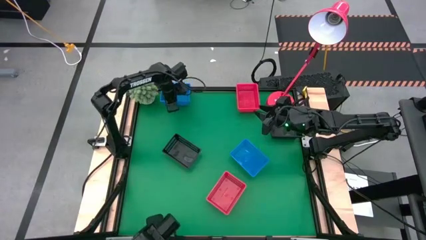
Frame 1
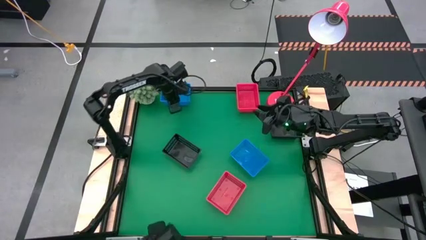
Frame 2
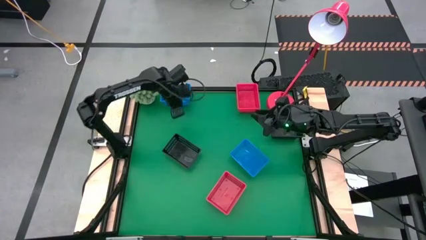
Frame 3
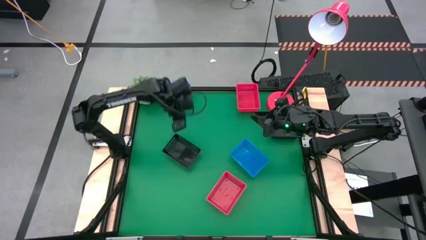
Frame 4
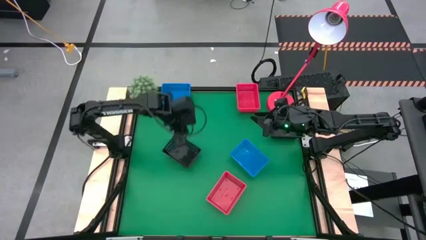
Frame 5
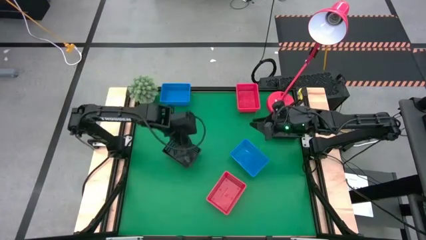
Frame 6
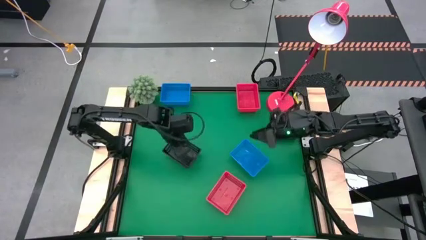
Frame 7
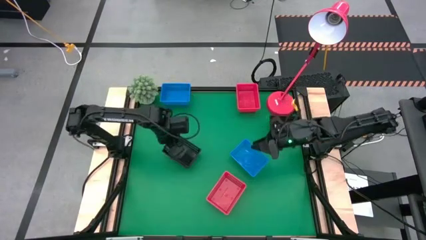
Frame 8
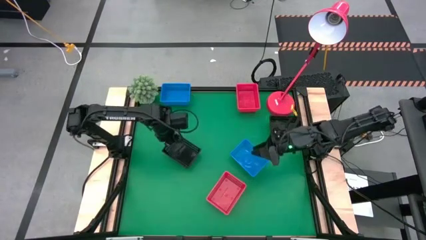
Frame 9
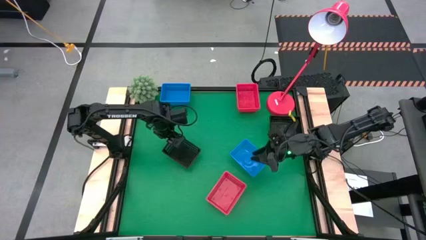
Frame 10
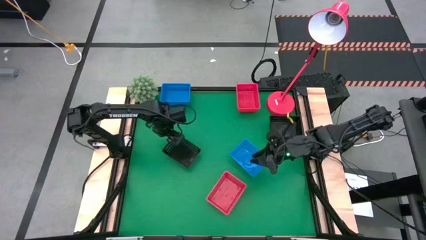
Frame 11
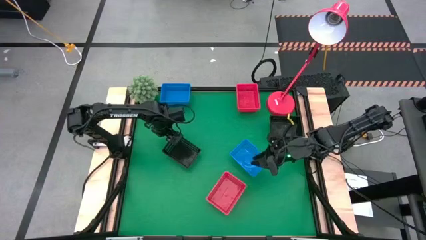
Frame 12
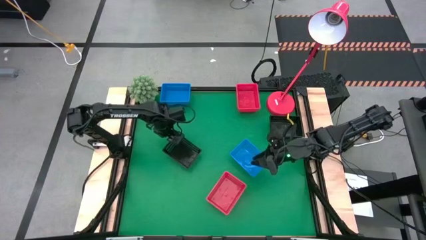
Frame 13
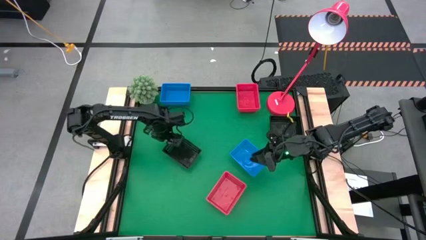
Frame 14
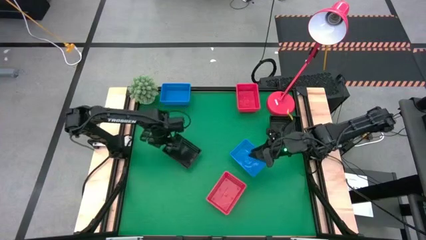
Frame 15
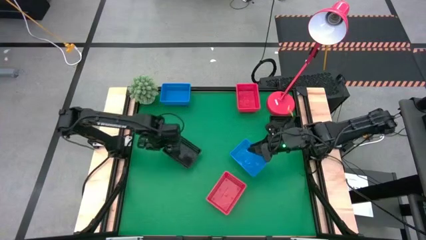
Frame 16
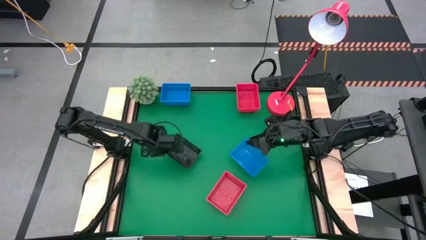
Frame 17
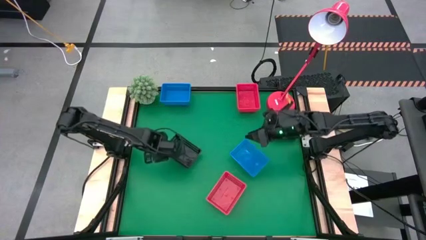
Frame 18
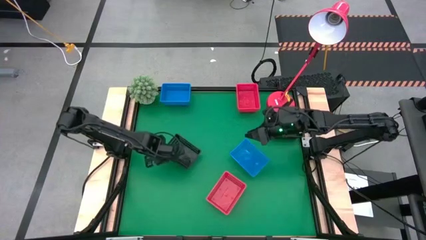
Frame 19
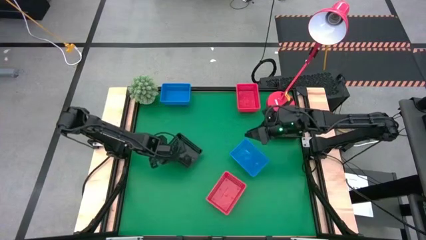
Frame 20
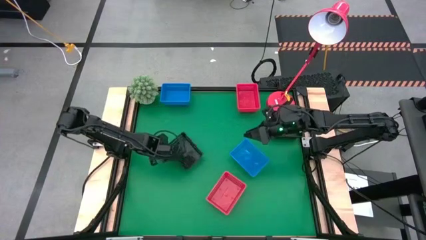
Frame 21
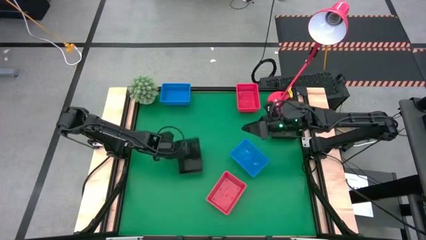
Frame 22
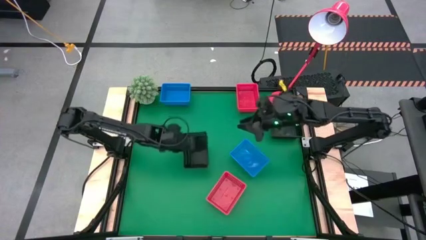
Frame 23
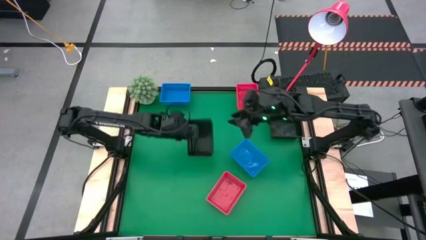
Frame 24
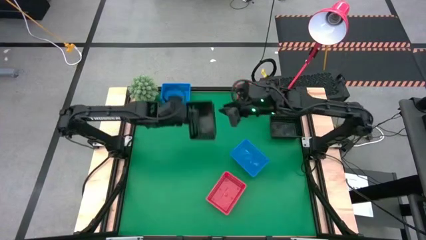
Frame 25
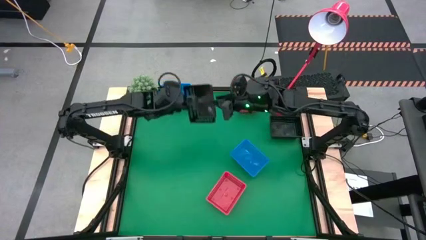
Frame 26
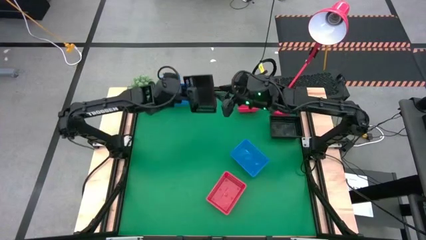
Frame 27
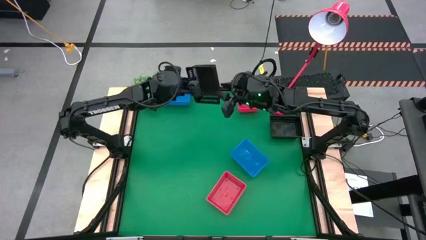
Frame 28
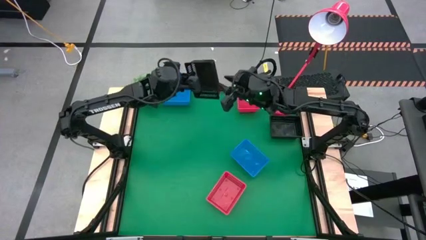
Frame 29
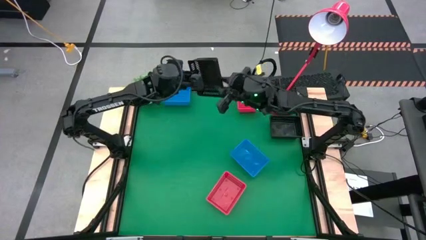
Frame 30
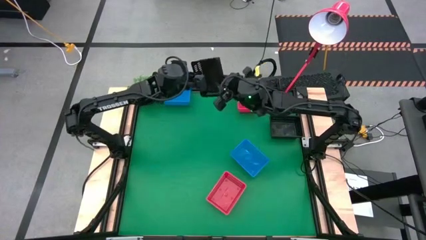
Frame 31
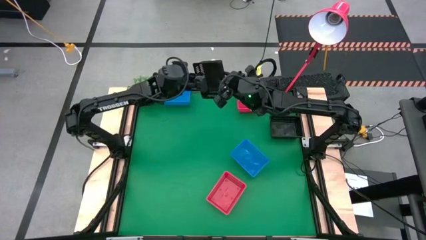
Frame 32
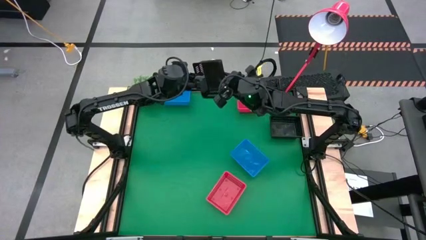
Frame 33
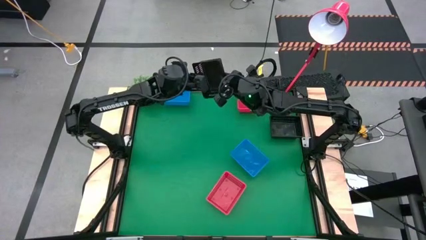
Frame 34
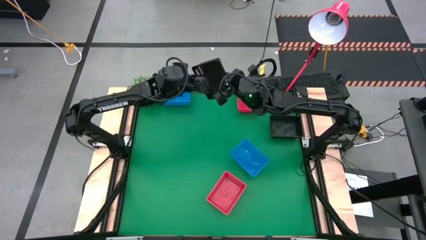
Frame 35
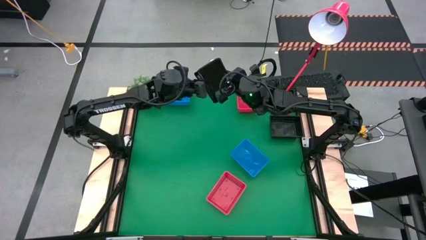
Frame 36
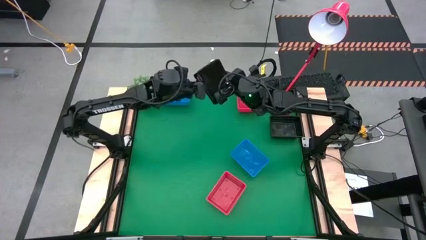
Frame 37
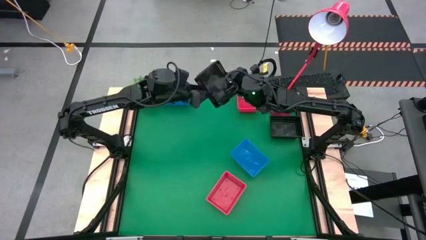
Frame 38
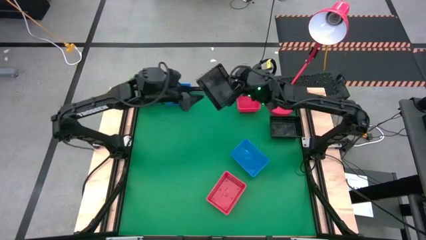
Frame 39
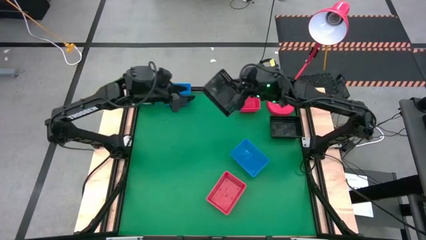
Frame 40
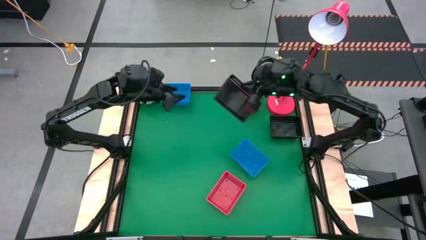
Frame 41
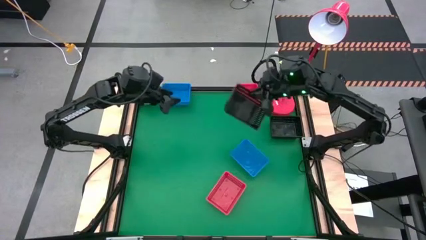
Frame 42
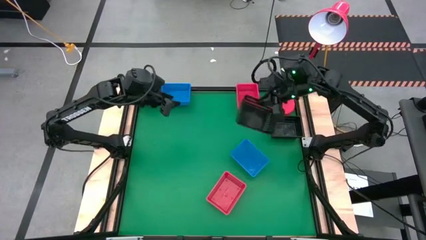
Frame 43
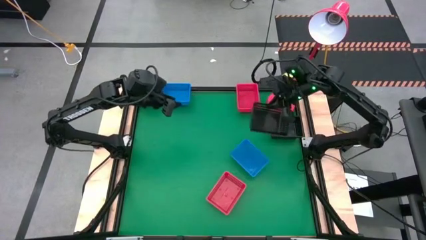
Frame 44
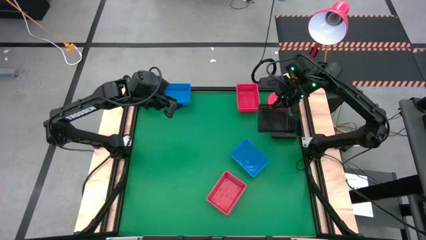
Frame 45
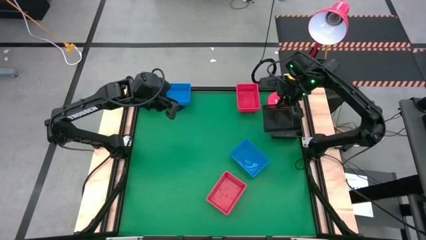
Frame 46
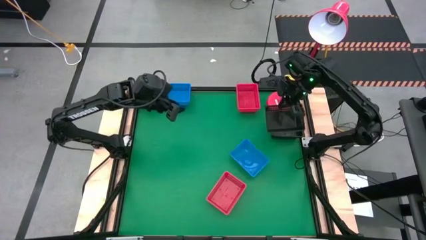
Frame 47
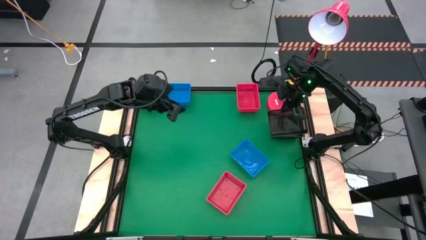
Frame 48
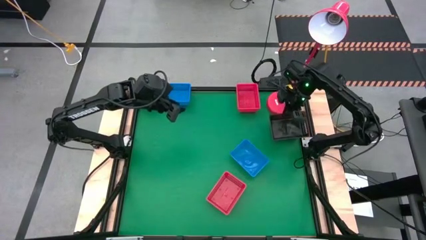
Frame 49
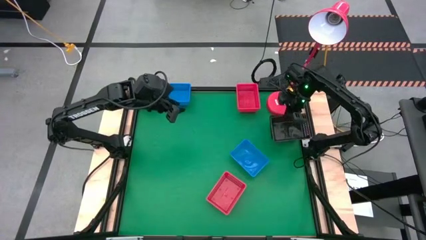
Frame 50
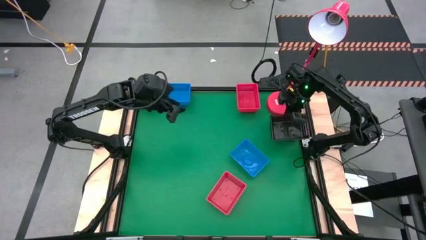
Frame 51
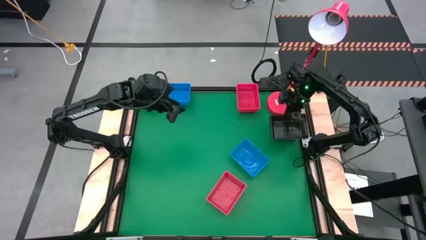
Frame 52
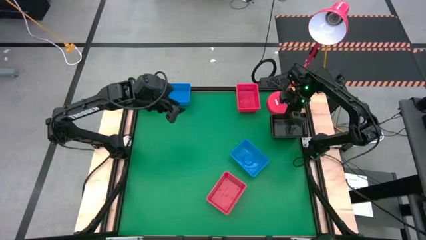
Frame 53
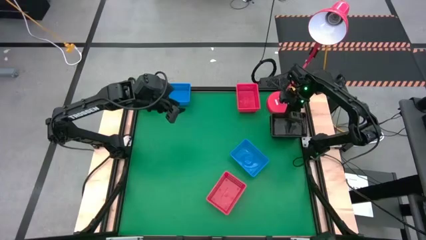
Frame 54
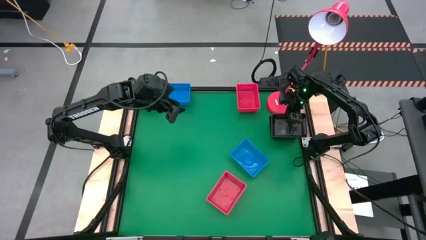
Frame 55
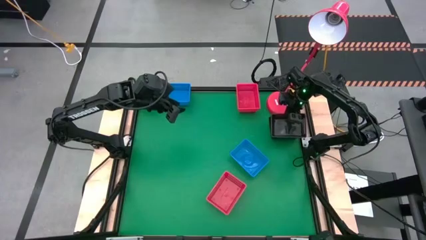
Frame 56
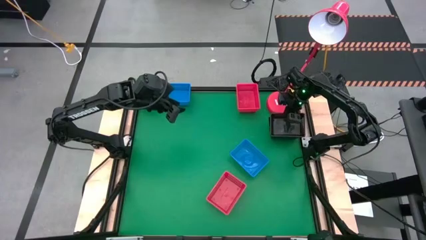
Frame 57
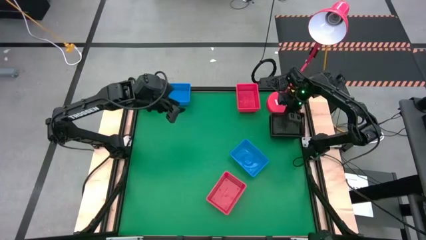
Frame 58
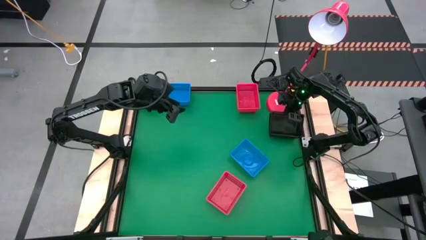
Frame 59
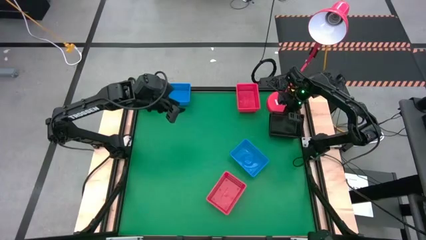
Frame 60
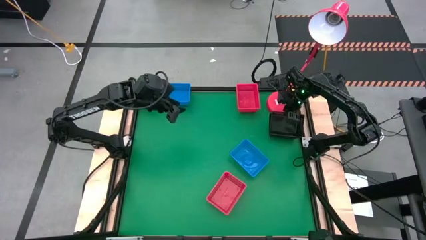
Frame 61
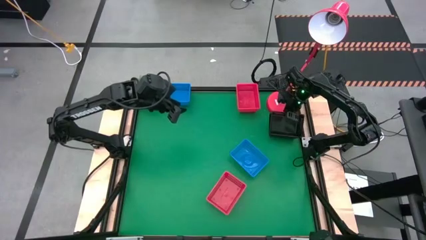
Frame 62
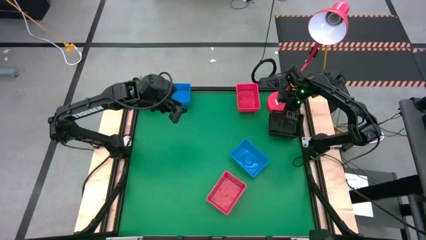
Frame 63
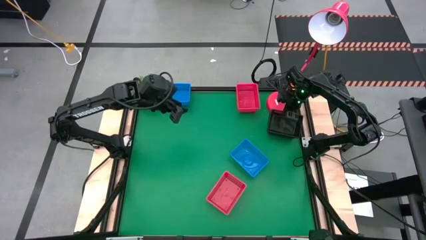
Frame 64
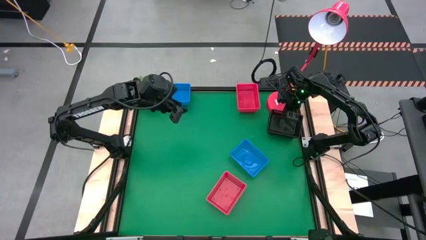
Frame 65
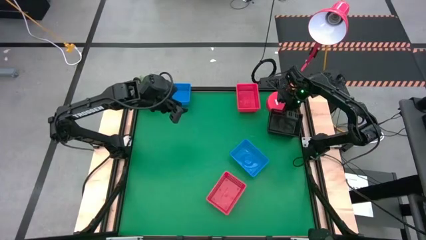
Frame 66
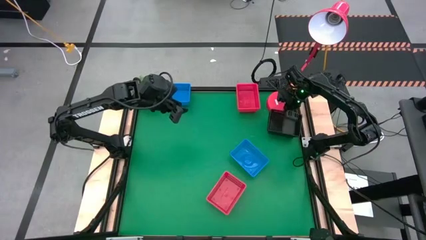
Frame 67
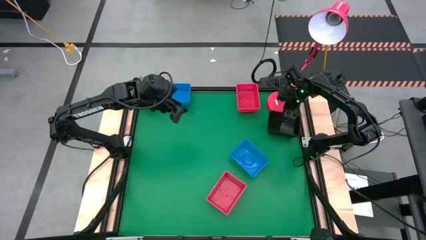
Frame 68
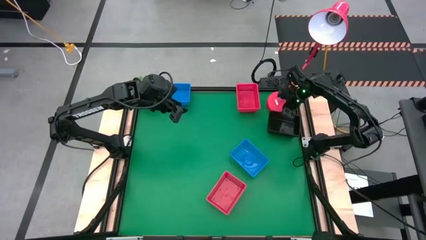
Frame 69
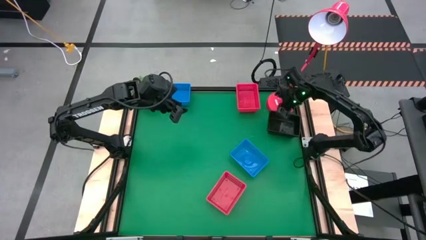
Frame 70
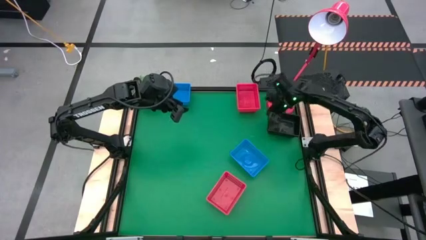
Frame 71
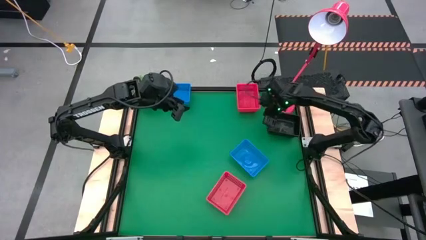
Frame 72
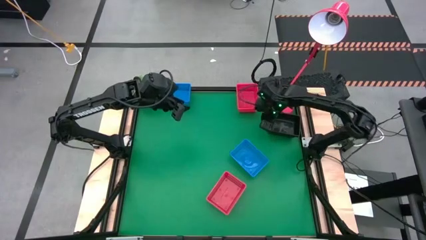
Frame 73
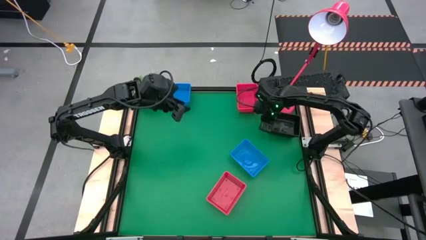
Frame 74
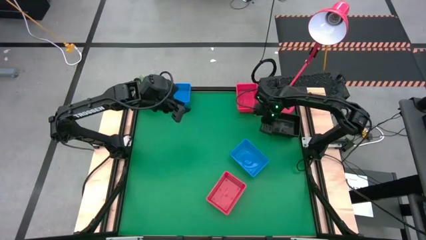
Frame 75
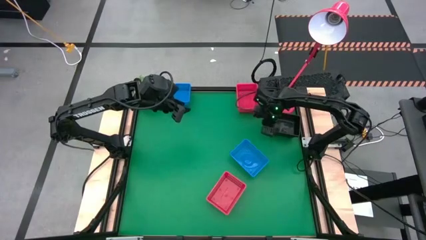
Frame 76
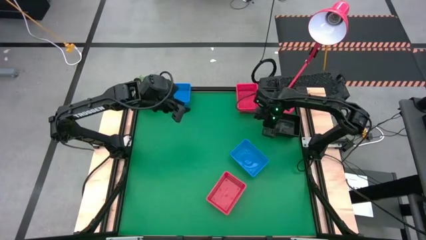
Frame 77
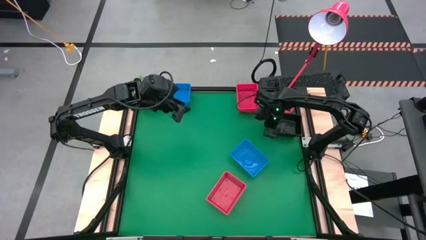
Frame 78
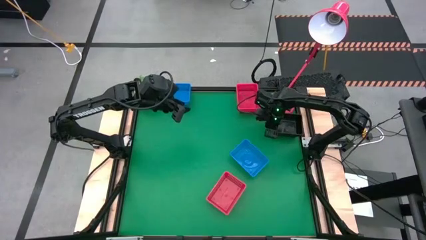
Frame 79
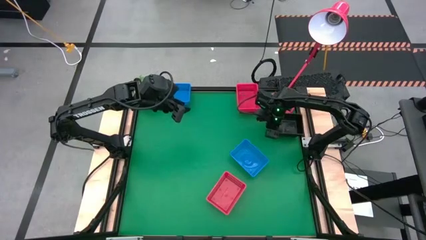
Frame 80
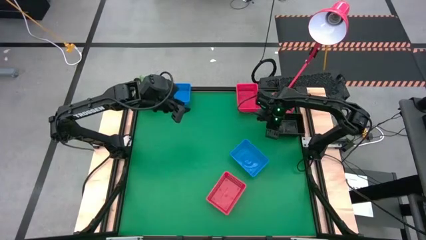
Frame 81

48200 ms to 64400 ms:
Stack the left black bin on top of the stacked black bins
